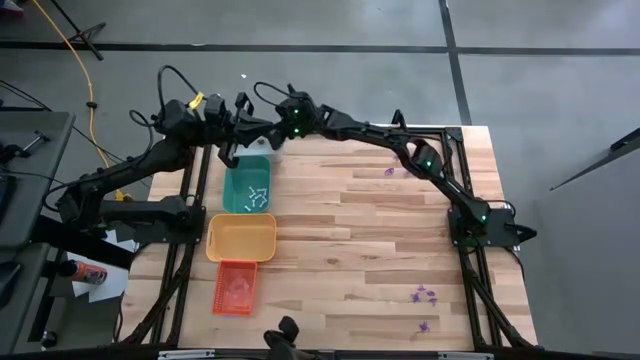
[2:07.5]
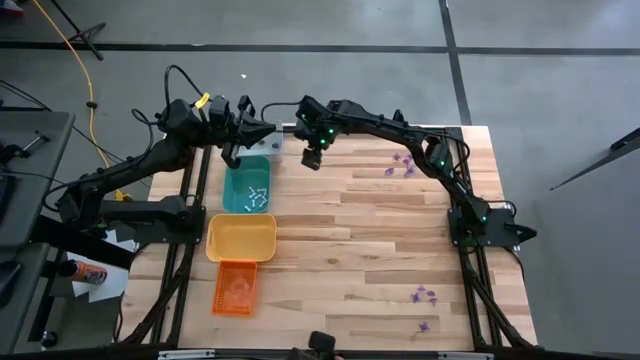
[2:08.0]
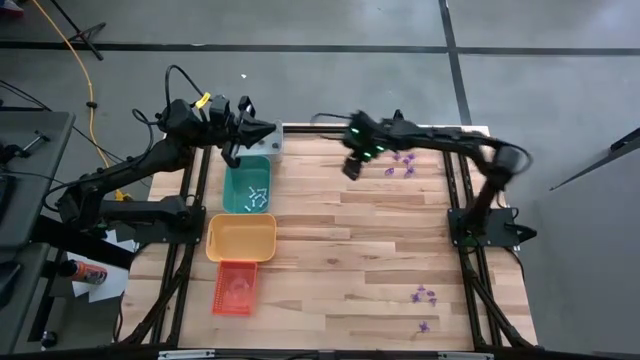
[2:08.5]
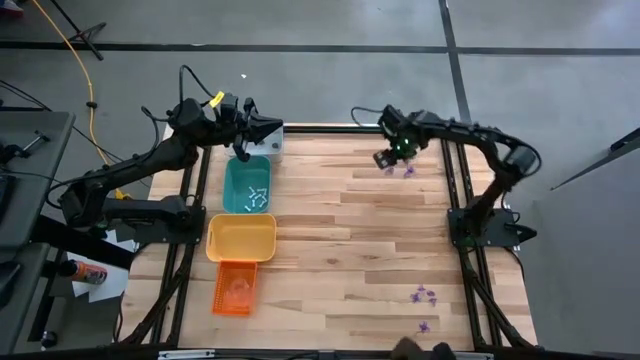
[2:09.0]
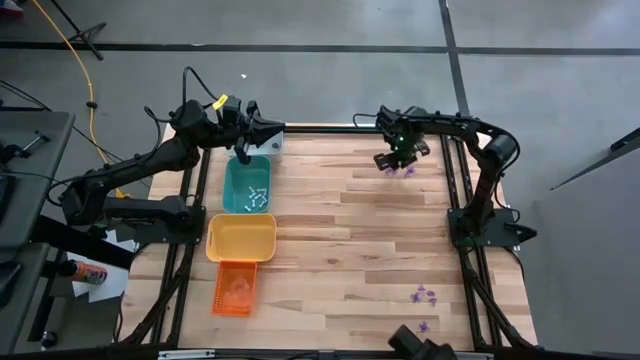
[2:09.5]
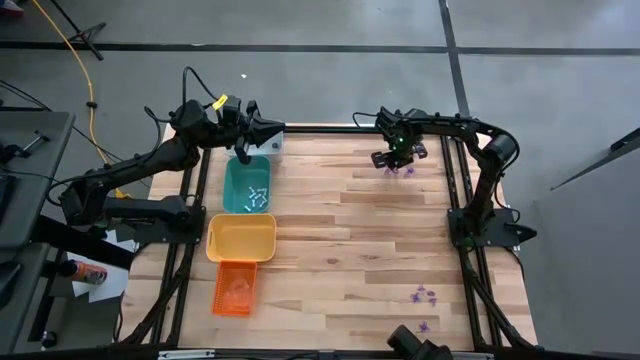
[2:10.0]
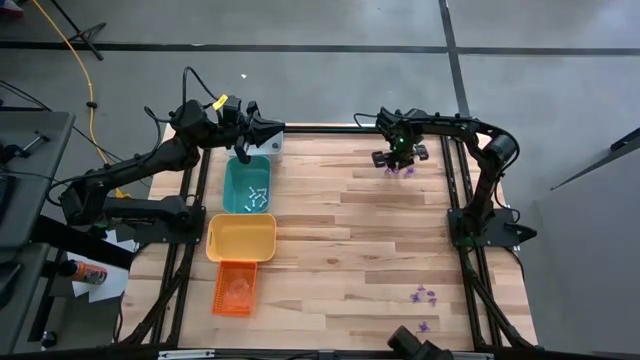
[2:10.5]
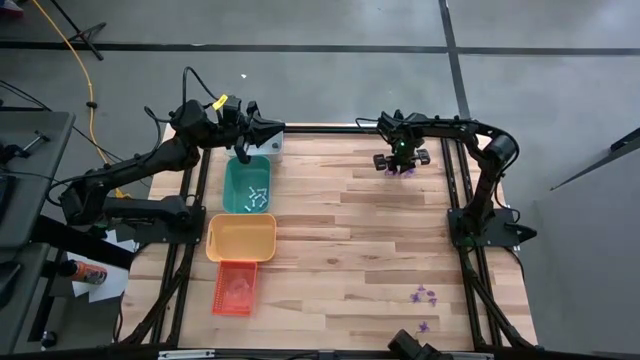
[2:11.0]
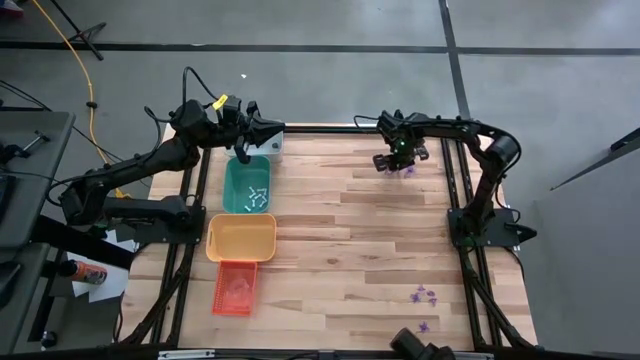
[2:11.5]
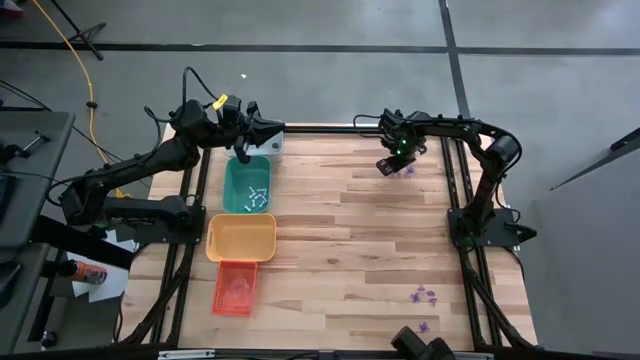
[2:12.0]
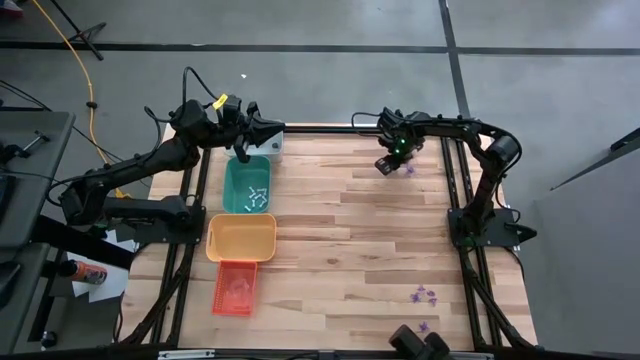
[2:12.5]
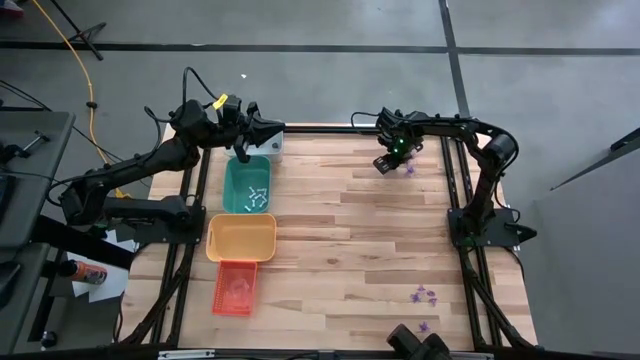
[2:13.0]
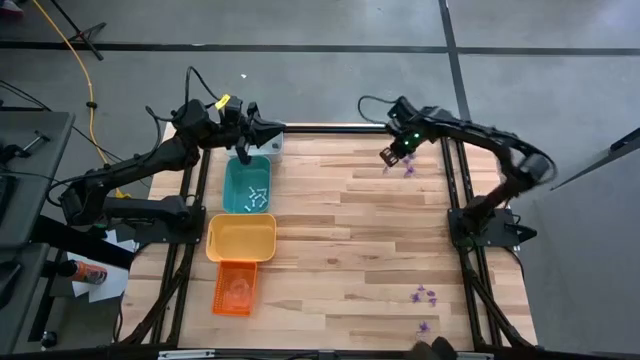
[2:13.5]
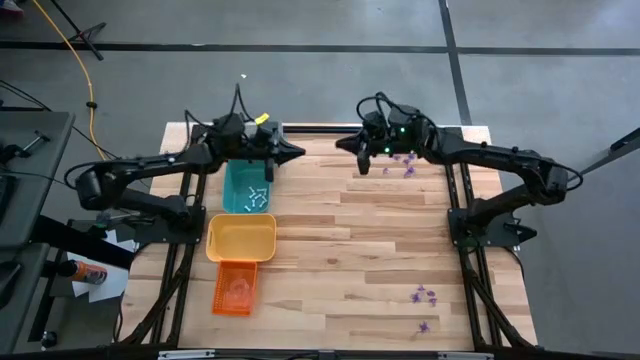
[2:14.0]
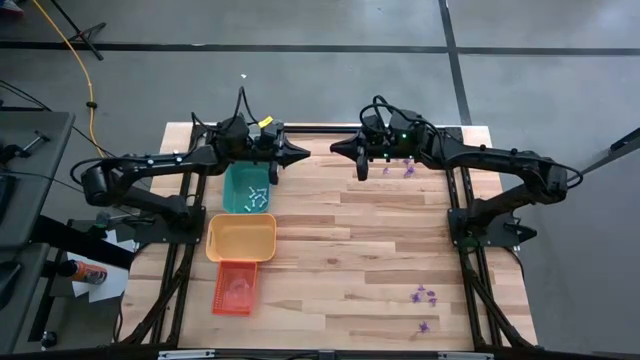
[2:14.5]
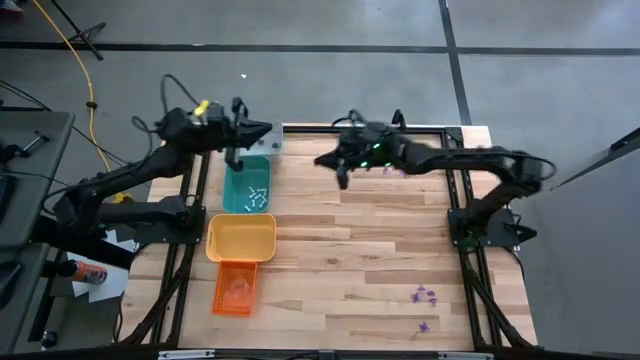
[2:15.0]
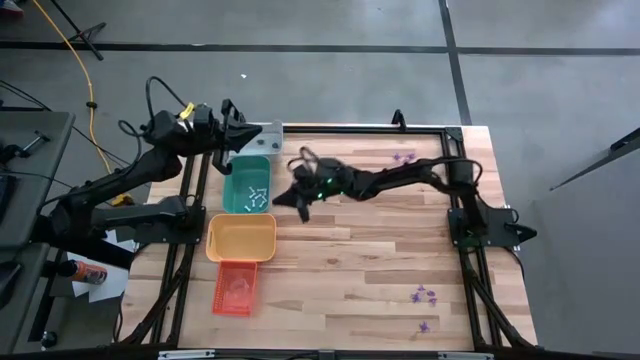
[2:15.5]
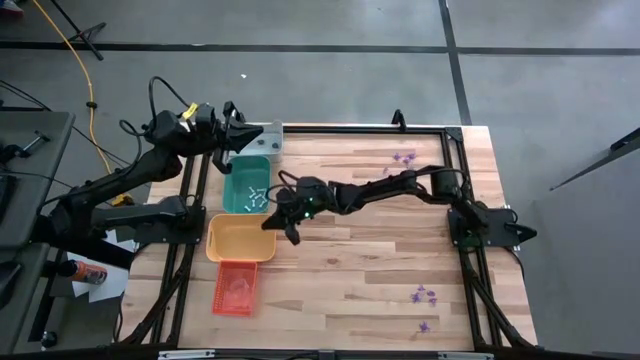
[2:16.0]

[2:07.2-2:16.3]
Task: Sort Halloween decoration
Put the purple witch hat toy in the yellow bin

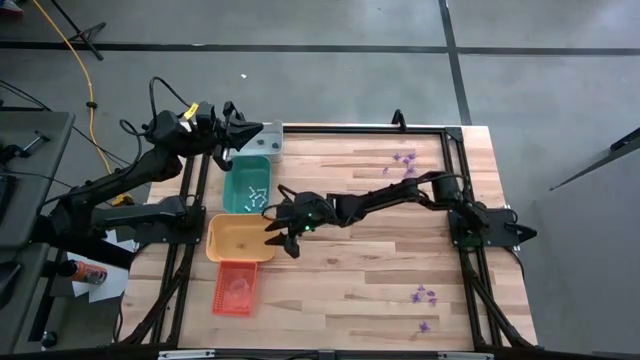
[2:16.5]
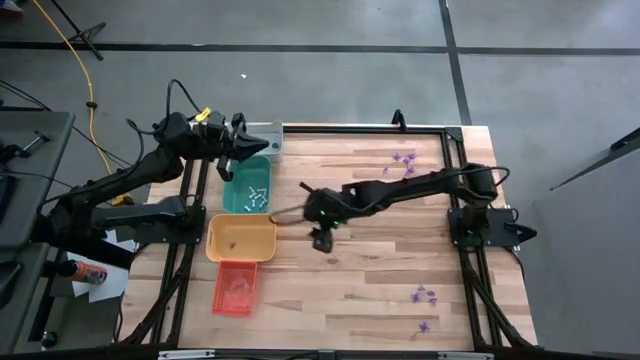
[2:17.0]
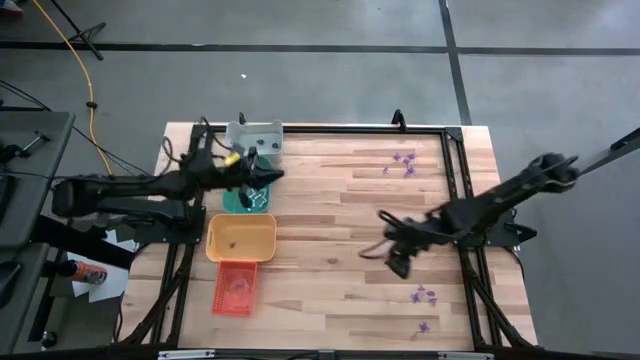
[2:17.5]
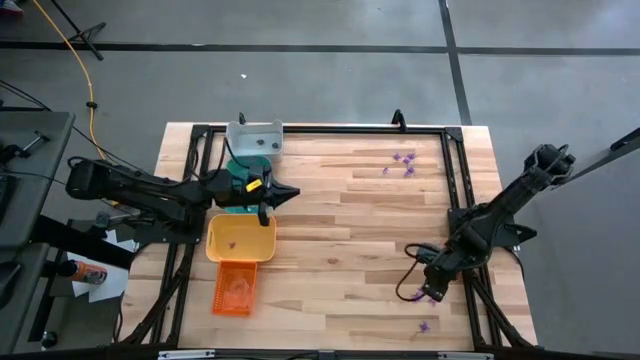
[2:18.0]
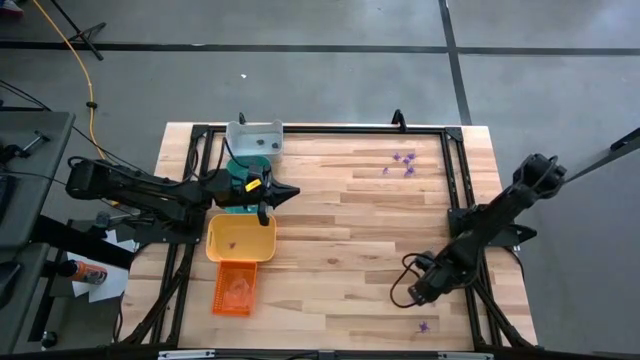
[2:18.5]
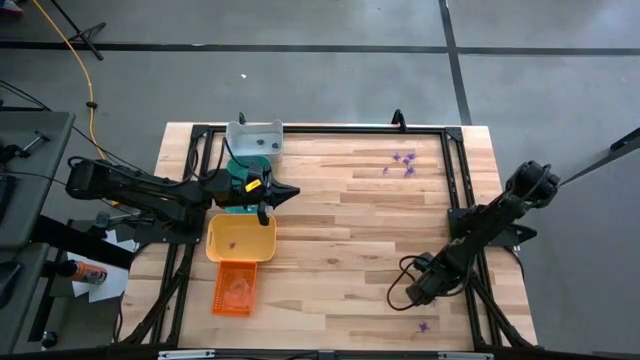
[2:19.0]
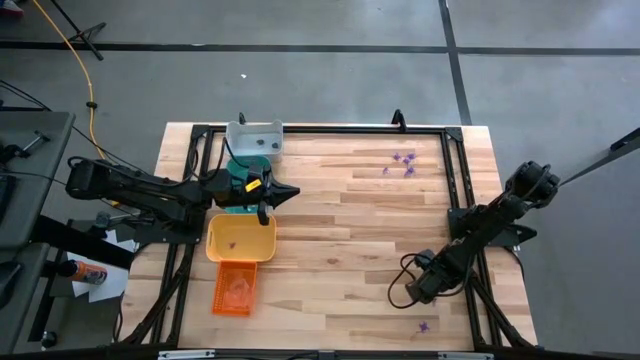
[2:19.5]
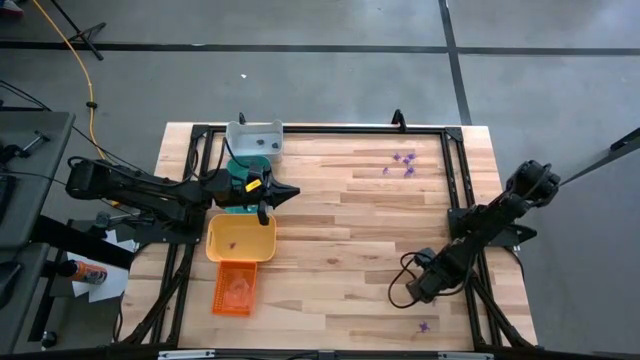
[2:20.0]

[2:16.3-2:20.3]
Put the purple witch hat toy in the yellow bin

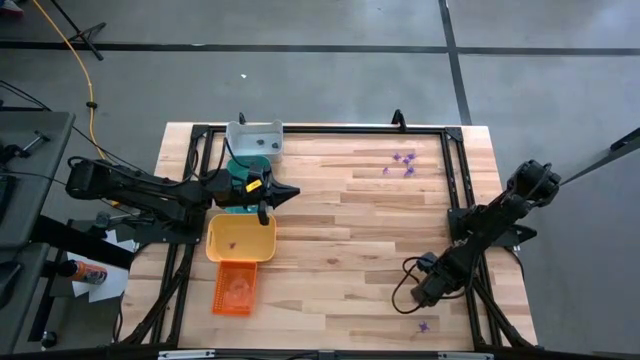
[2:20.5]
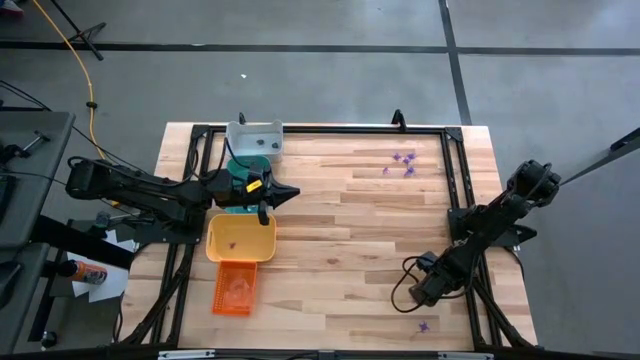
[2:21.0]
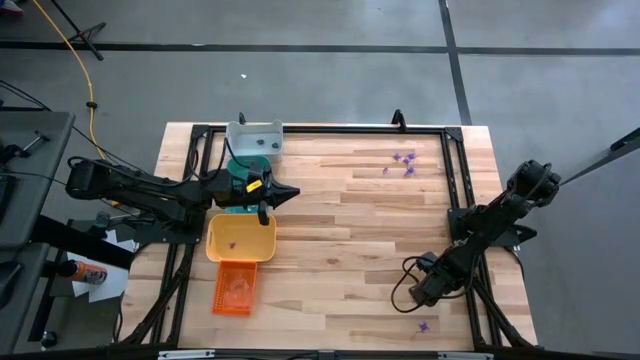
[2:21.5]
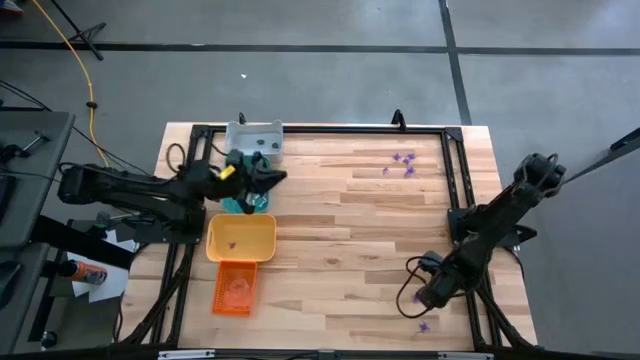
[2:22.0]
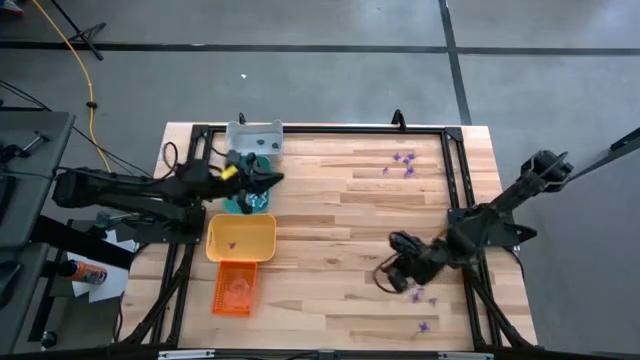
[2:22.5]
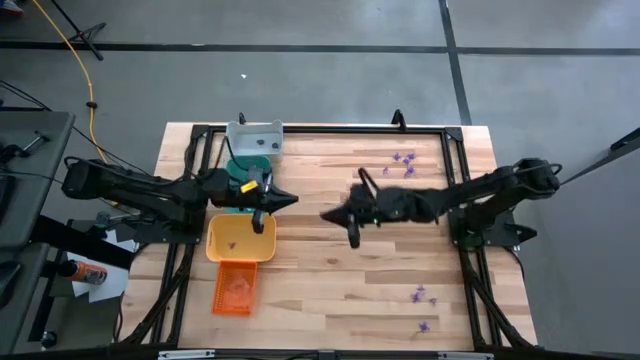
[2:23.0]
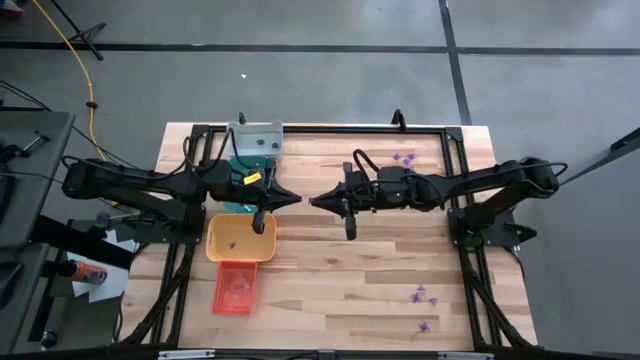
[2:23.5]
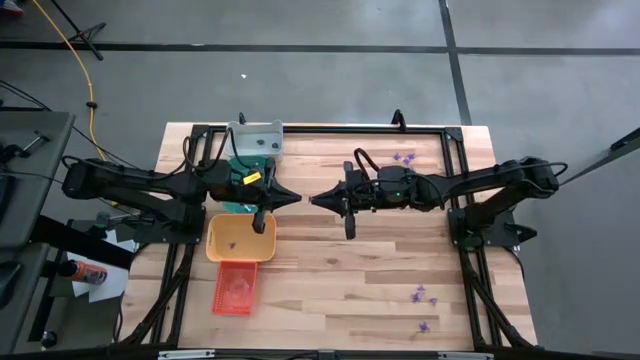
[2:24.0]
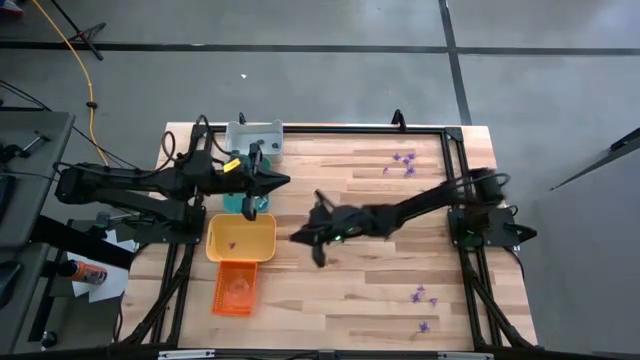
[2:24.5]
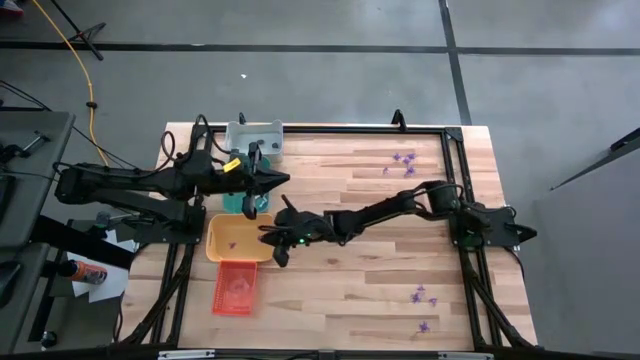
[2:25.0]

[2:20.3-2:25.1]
Put the purple witch hat toy in the yellow bin

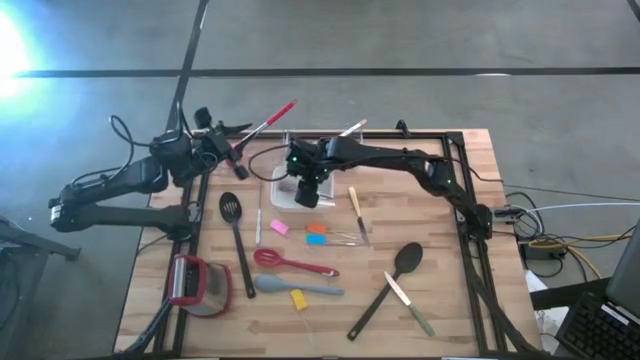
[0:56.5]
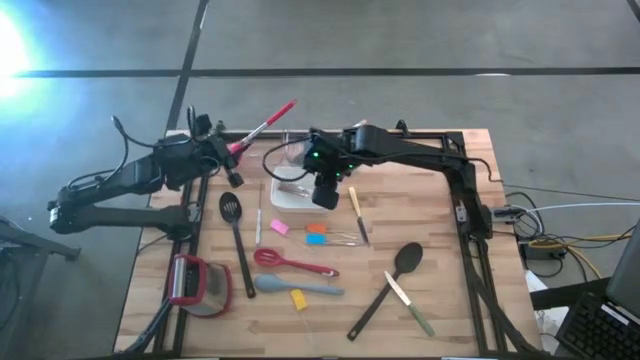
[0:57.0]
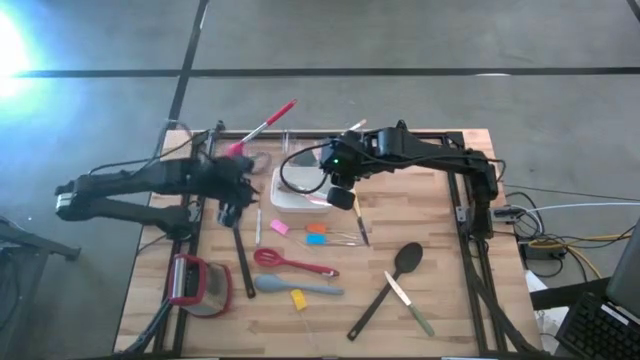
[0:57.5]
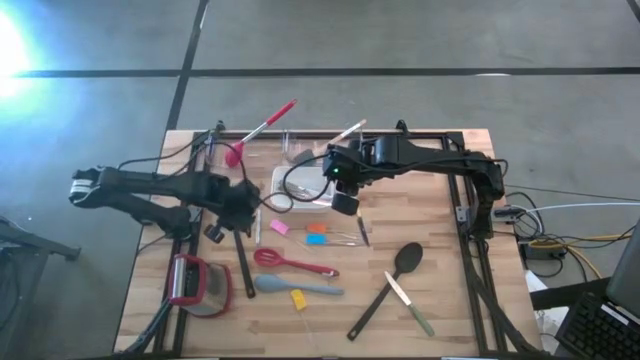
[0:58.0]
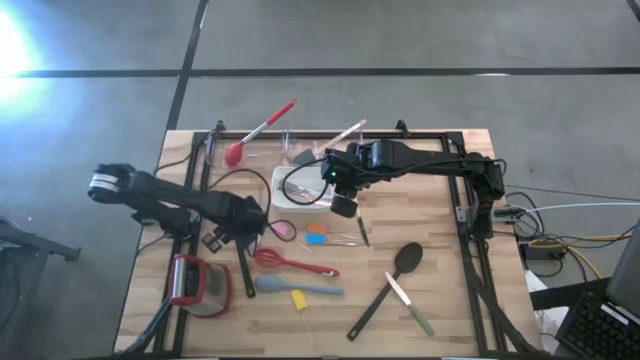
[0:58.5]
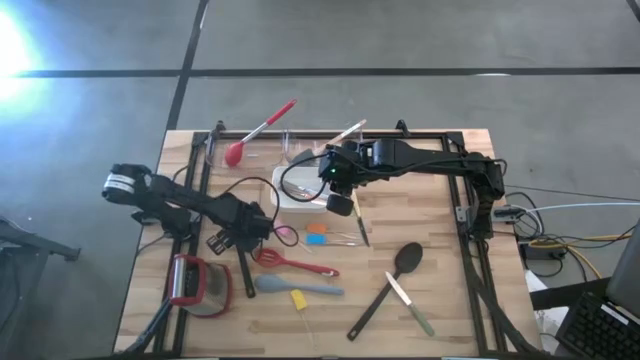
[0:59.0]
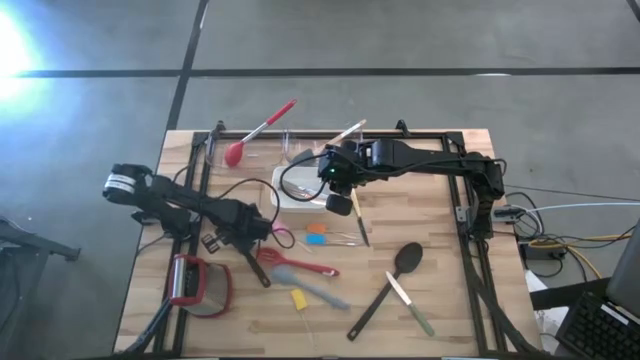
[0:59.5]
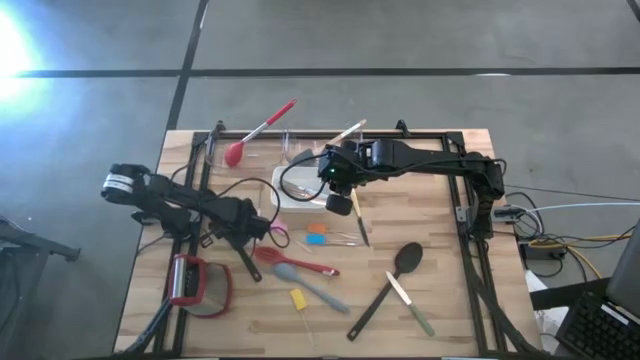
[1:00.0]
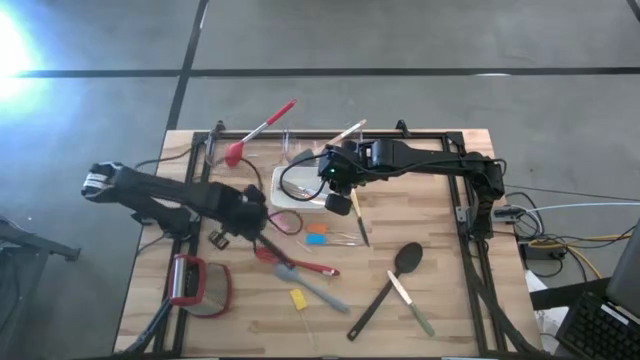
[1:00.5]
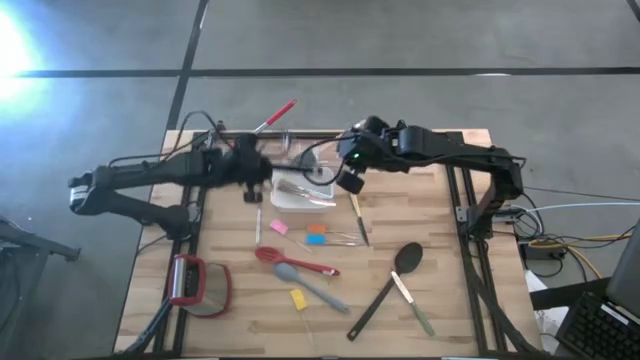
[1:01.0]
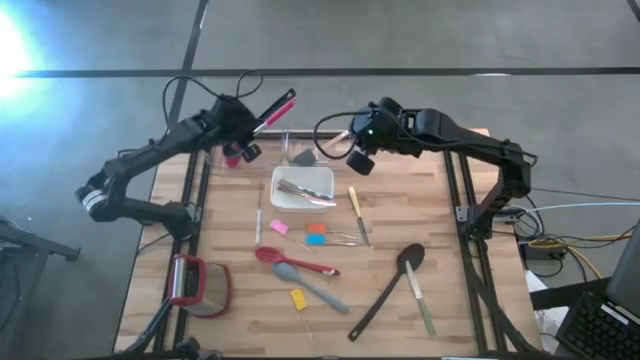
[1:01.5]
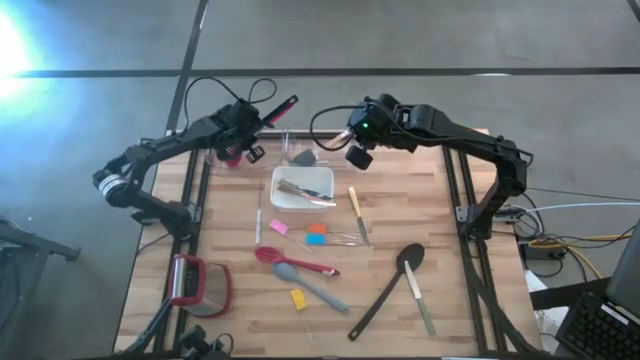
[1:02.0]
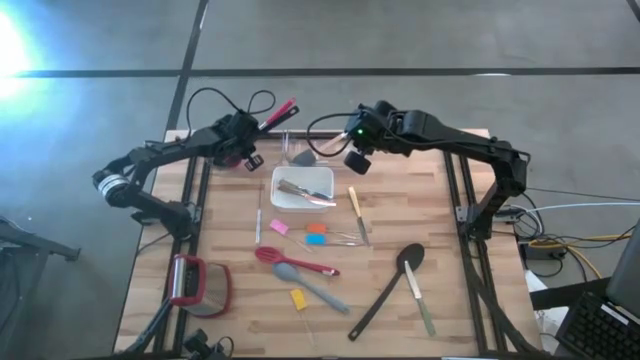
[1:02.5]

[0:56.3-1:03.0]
Task: Pick & Place Kitchen Items
Put the black slotted serving spoon into the left transparent bin
